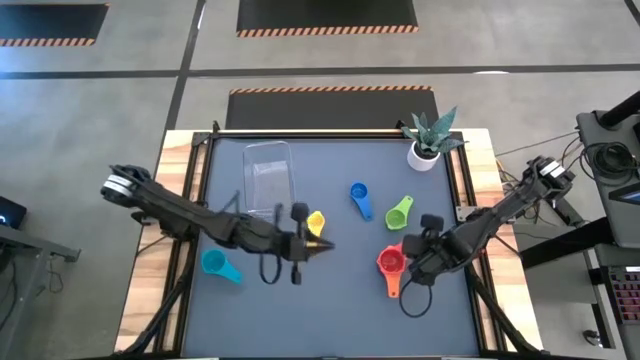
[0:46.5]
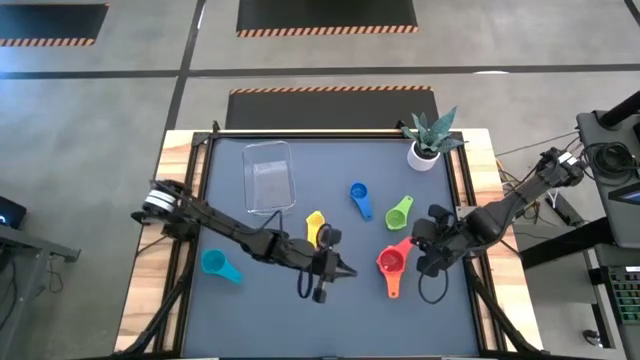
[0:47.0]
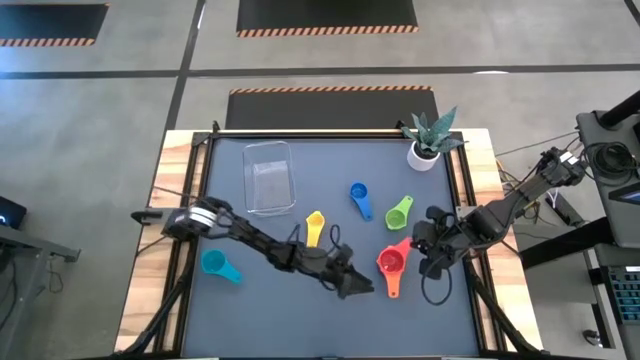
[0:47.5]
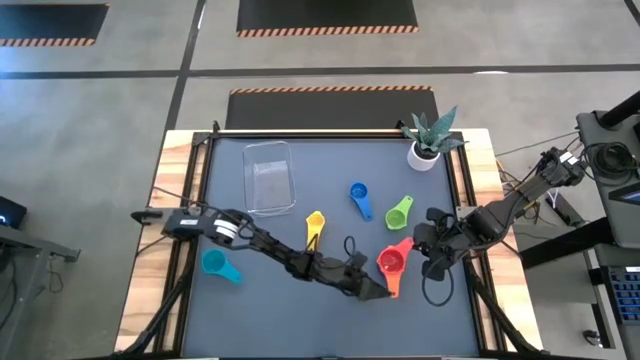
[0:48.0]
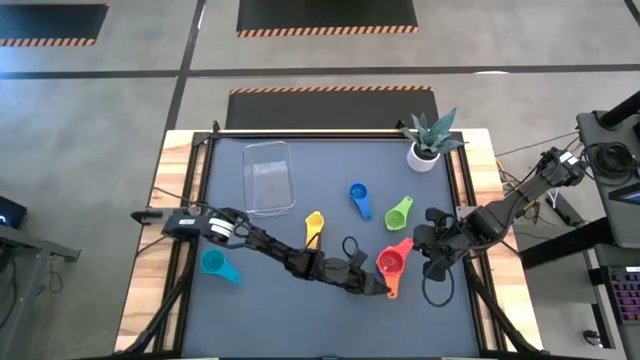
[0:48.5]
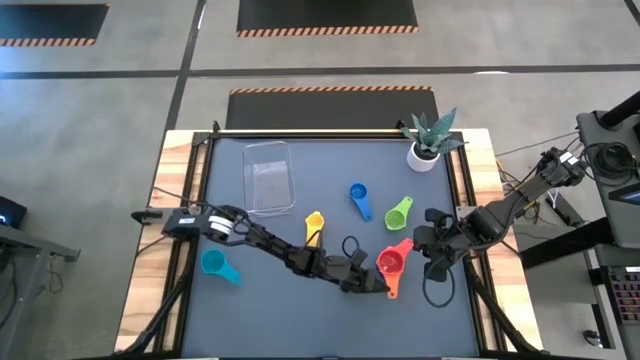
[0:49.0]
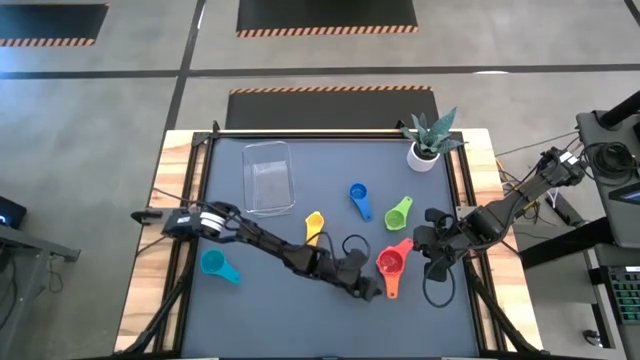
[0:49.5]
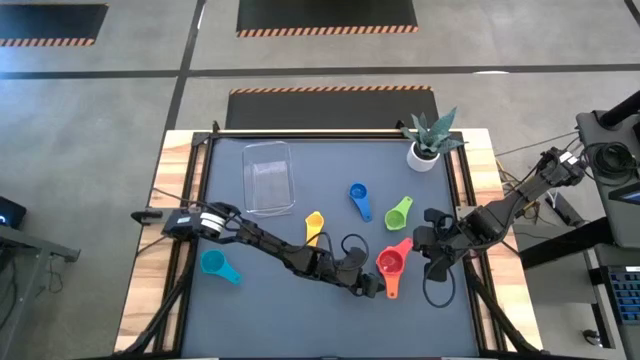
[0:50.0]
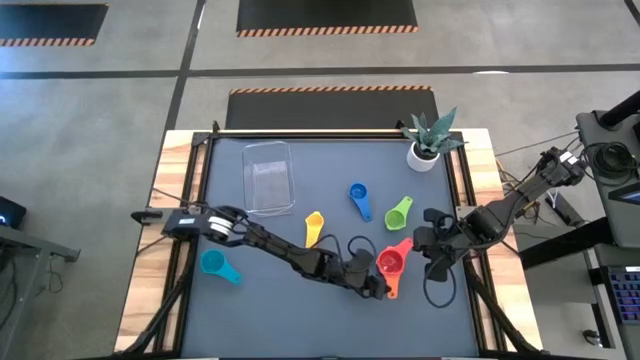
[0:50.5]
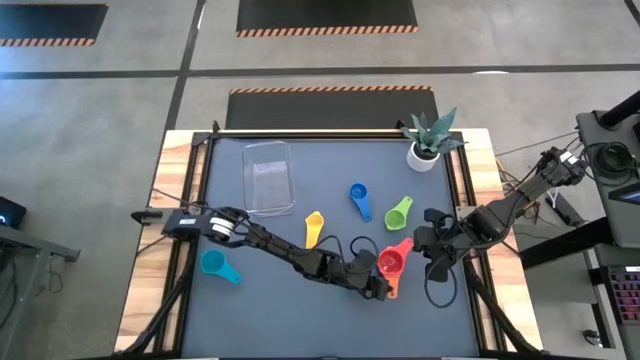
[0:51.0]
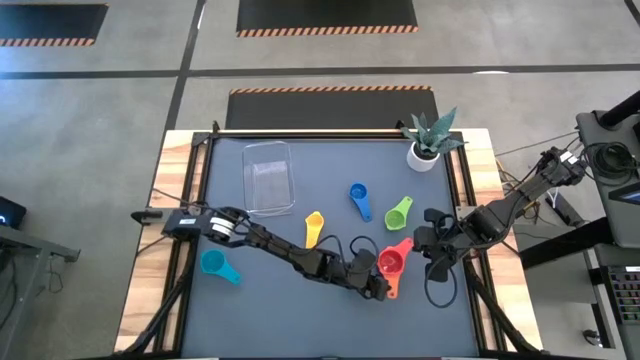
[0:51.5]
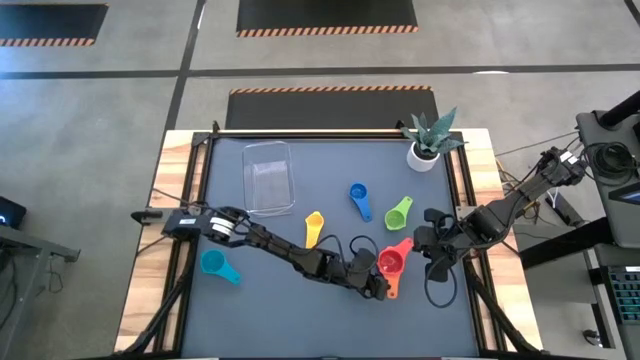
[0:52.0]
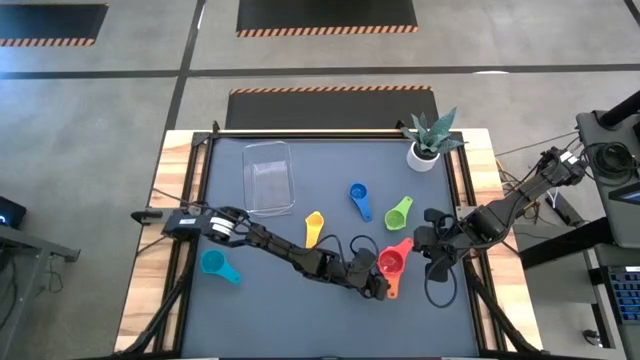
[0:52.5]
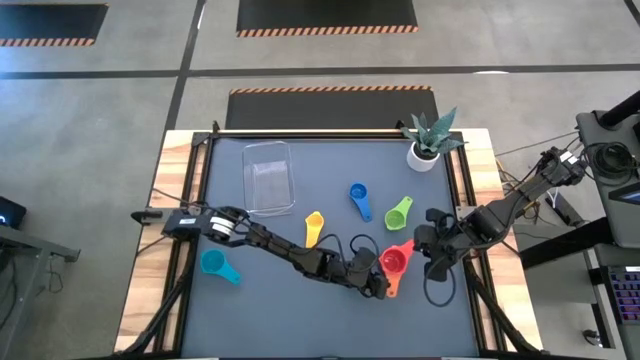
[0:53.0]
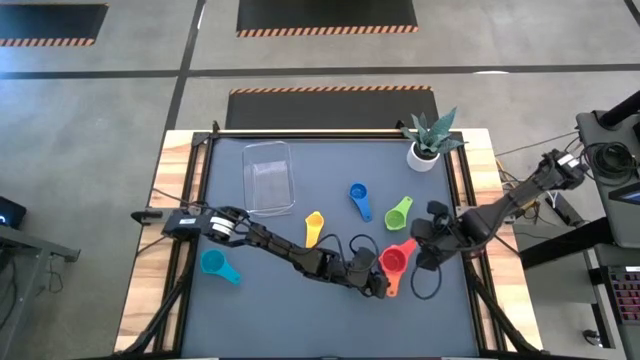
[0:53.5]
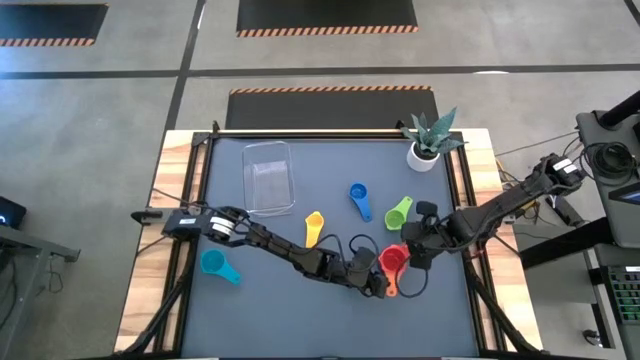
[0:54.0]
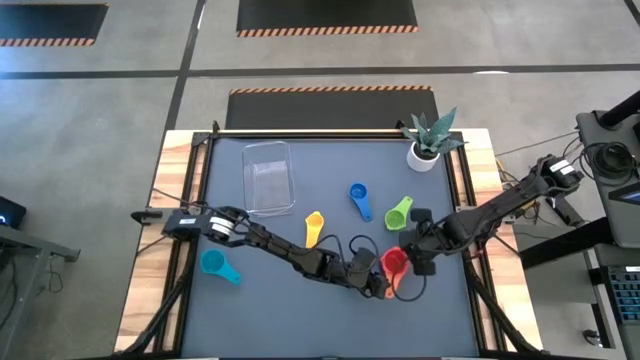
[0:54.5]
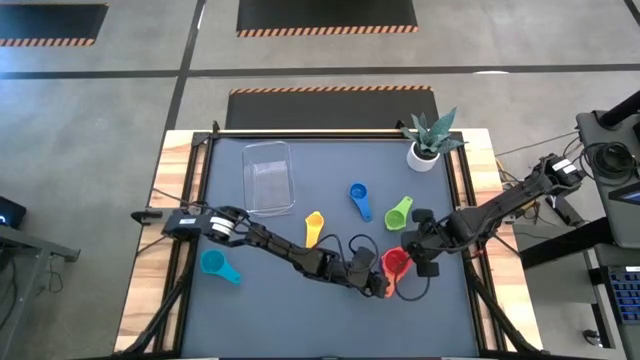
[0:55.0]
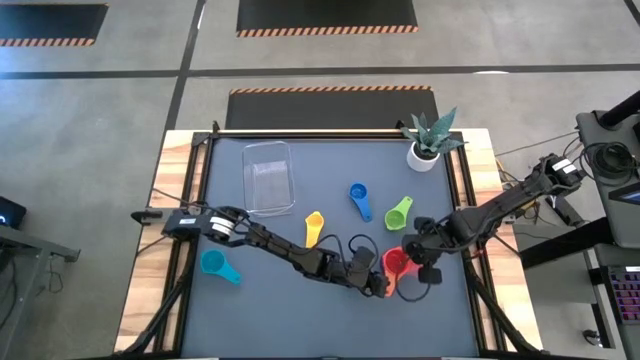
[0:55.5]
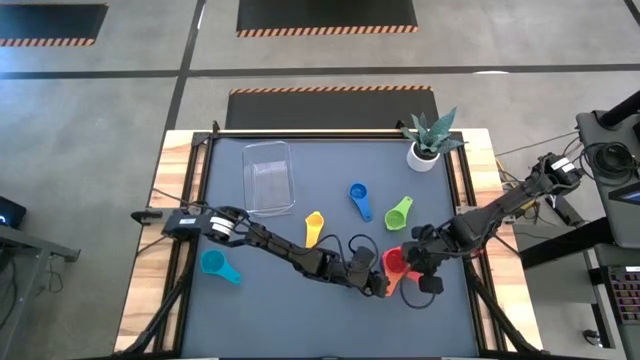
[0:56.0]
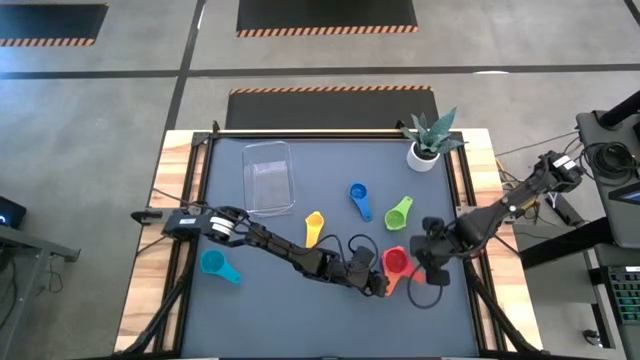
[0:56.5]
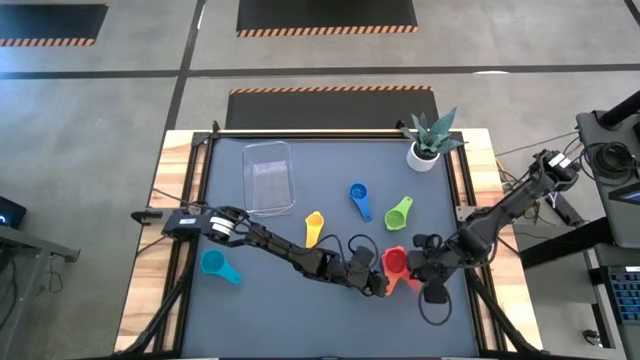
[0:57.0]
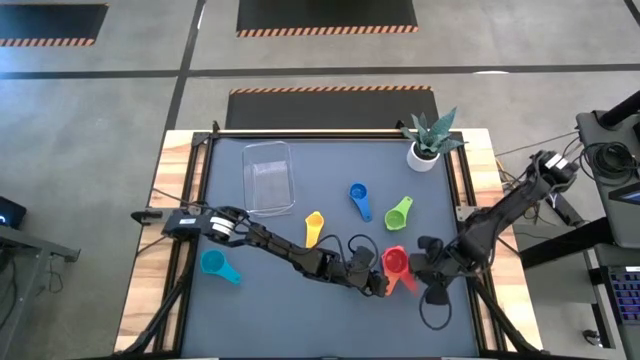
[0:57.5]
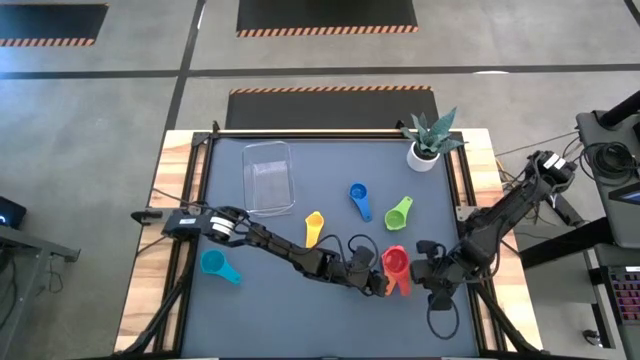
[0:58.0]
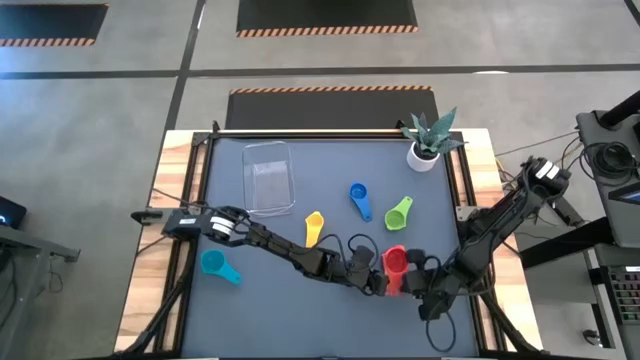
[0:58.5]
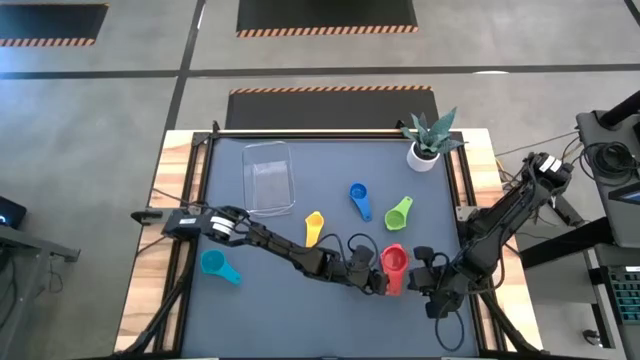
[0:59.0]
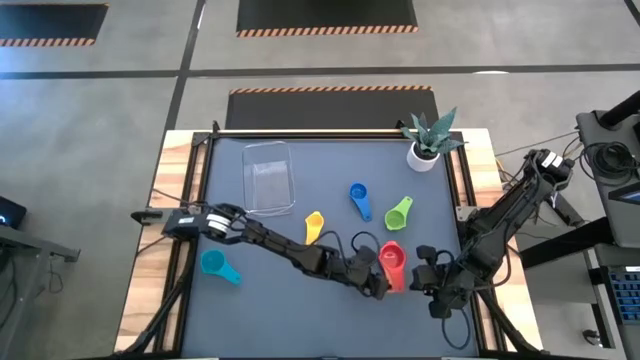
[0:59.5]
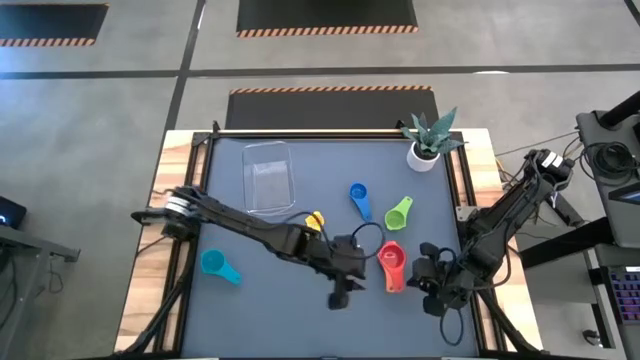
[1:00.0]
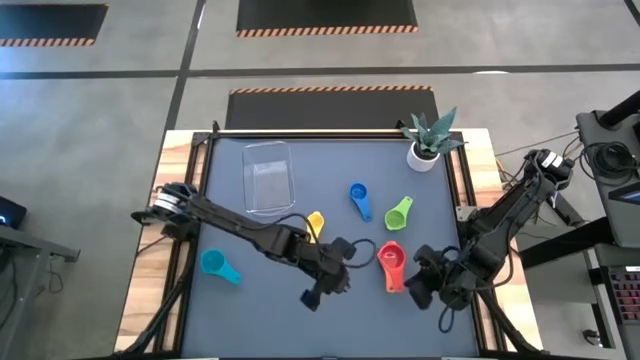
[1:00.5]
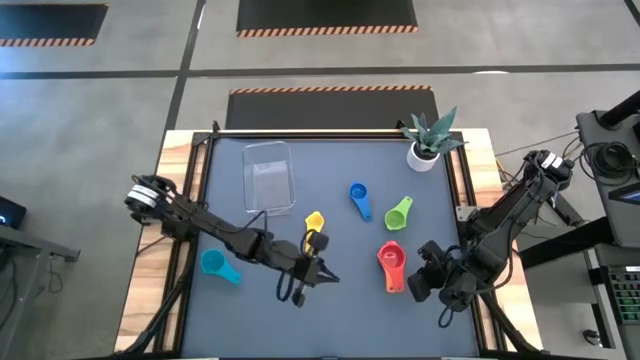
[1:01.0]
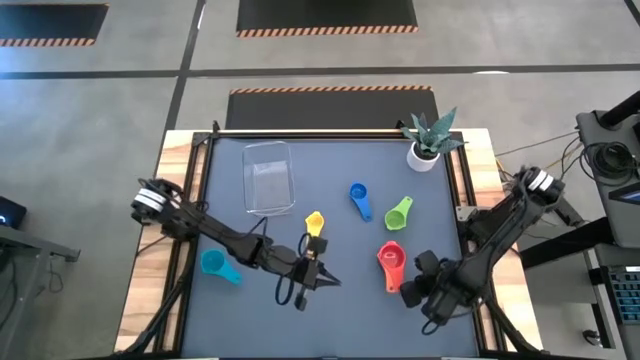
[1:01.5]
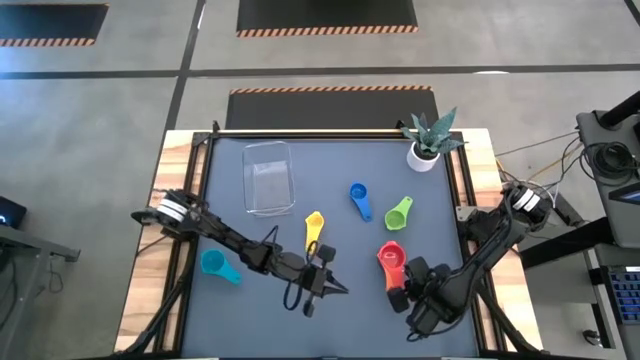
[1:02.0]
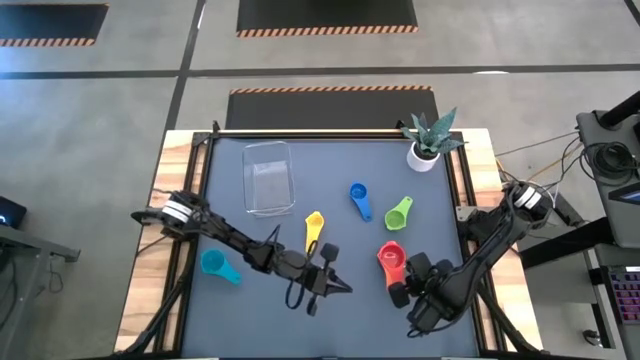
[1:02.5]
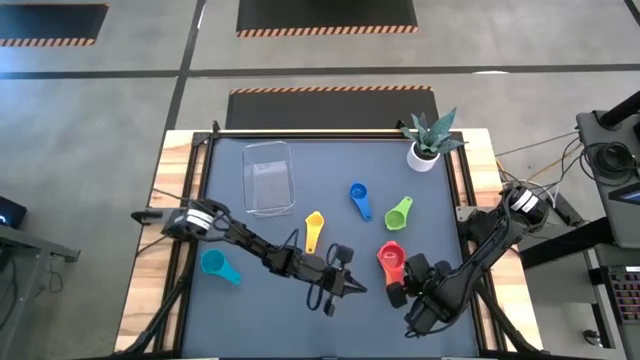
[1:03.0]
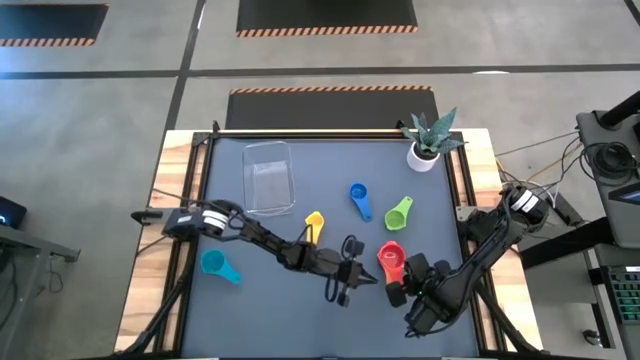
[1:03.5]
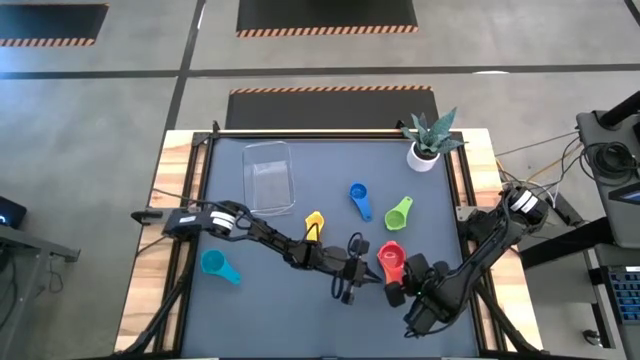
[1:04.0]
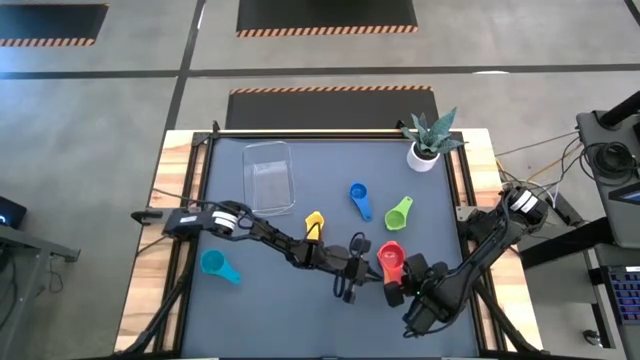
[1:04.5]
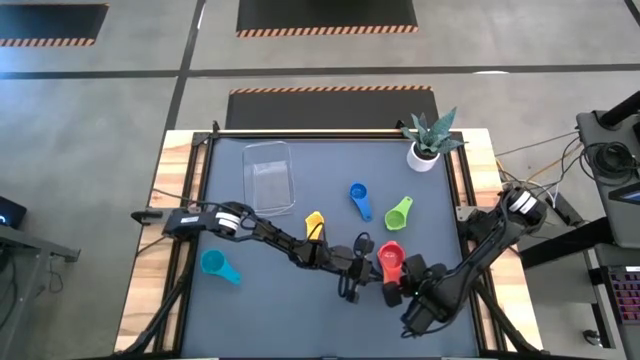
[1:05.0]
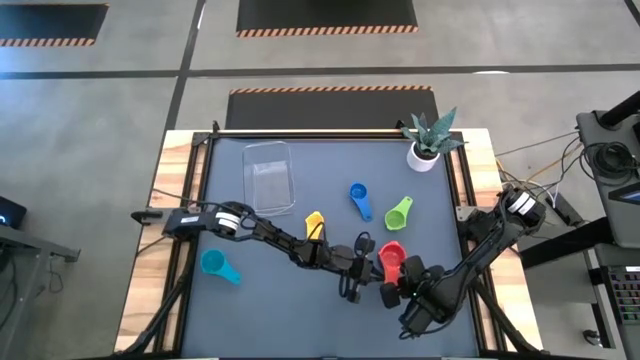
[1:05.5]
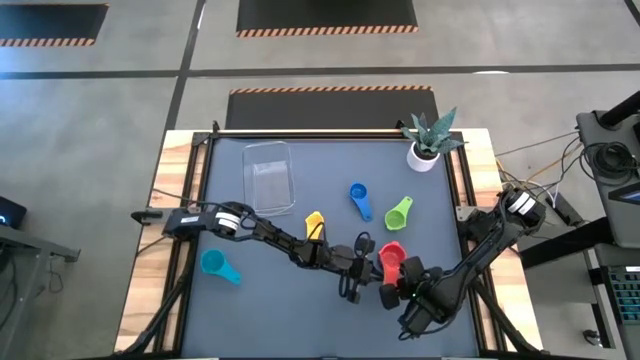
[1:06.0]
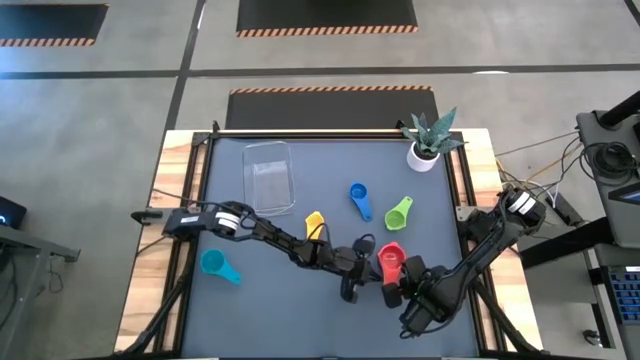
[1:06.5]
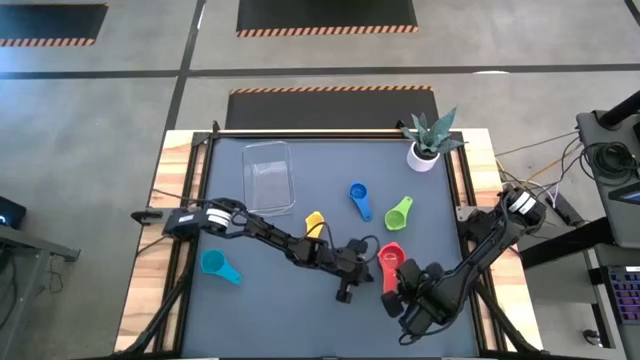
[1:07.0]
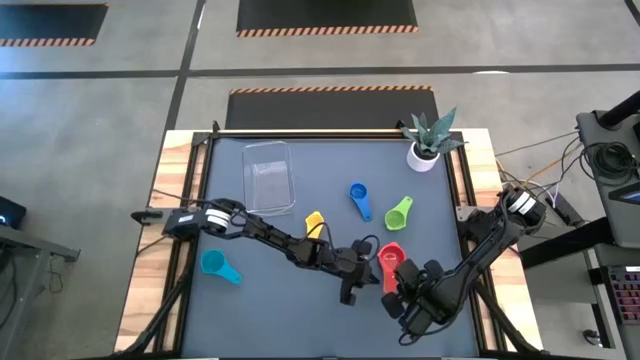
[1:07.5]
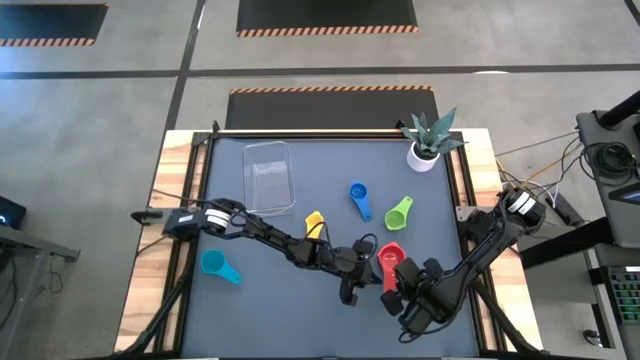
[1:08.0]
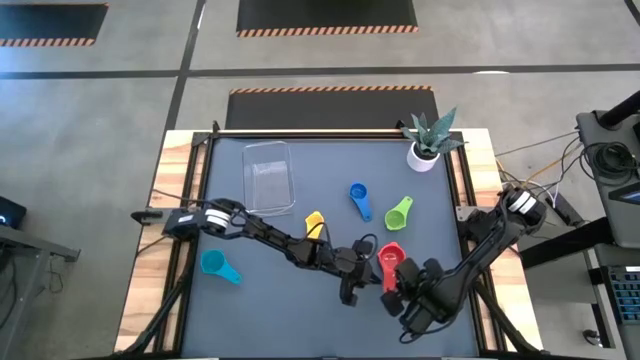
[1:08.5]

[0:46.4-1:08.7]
Task: Nest measuring cups in basket
Stack the red measuring cup on top of the orange measuring cup
